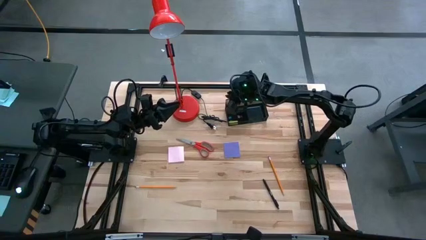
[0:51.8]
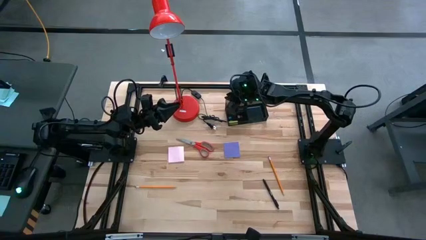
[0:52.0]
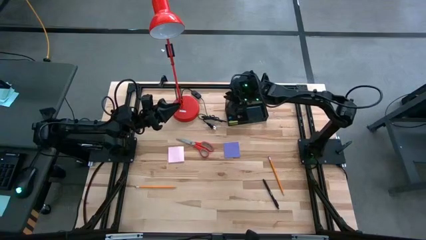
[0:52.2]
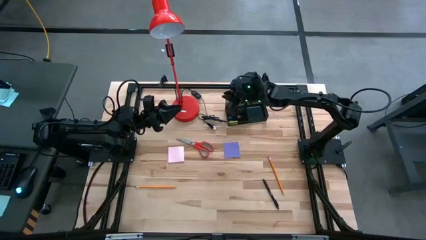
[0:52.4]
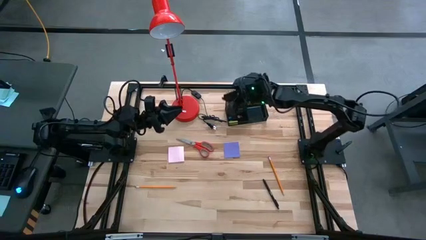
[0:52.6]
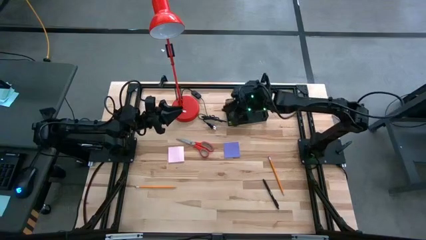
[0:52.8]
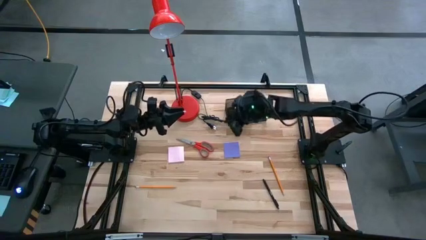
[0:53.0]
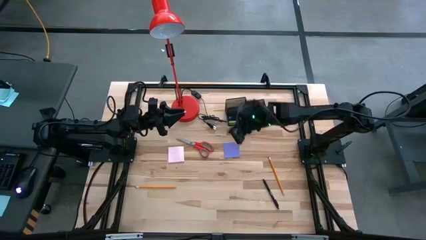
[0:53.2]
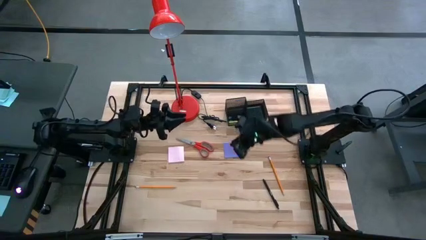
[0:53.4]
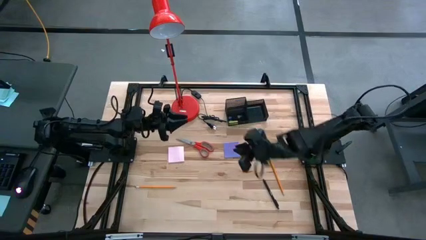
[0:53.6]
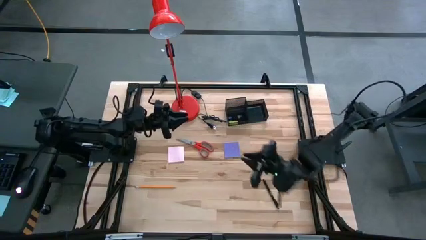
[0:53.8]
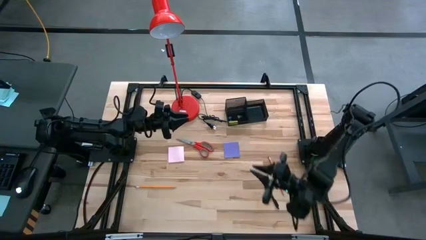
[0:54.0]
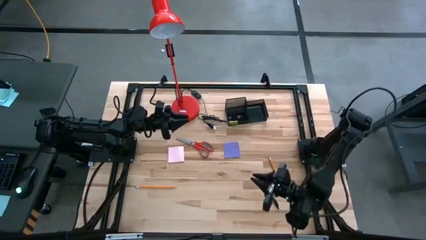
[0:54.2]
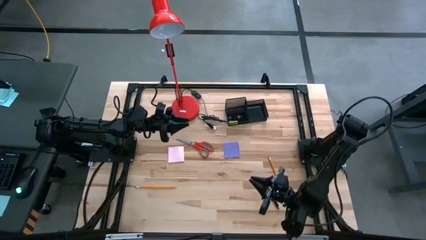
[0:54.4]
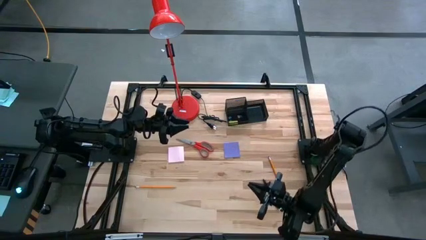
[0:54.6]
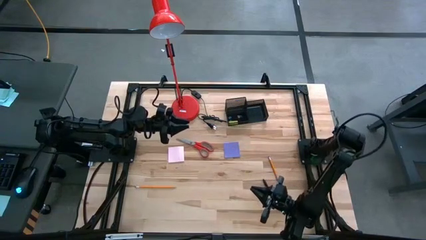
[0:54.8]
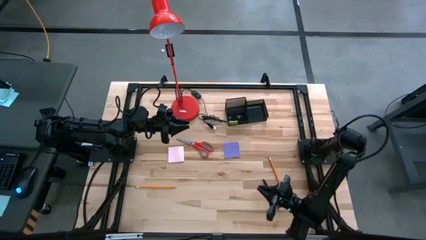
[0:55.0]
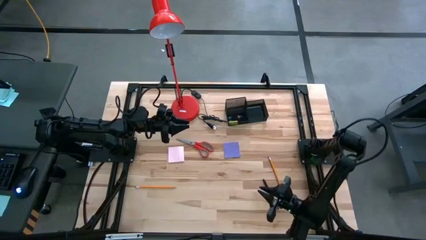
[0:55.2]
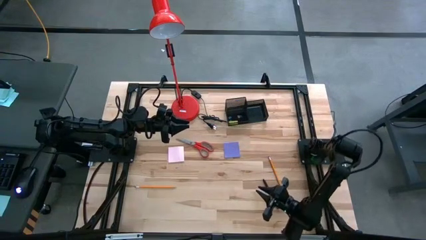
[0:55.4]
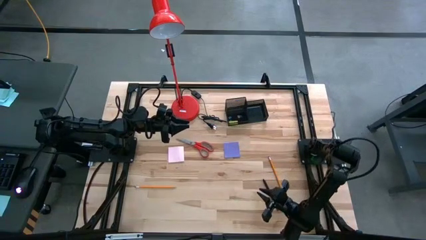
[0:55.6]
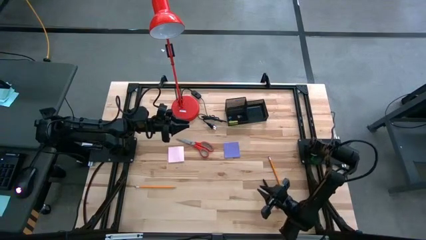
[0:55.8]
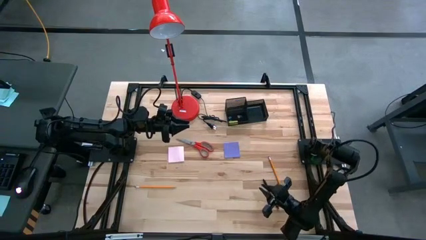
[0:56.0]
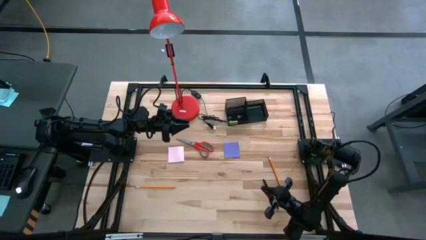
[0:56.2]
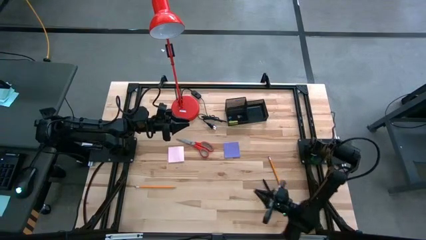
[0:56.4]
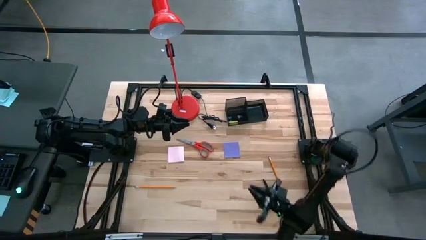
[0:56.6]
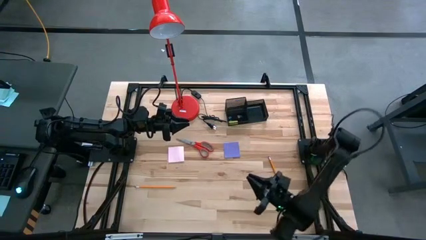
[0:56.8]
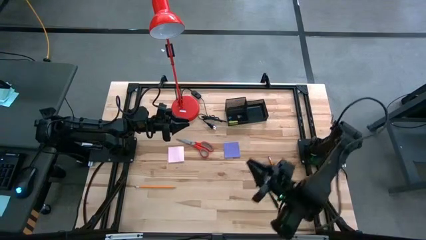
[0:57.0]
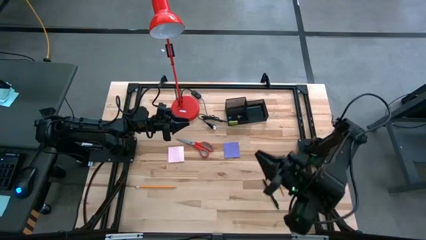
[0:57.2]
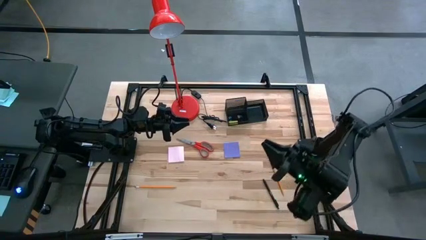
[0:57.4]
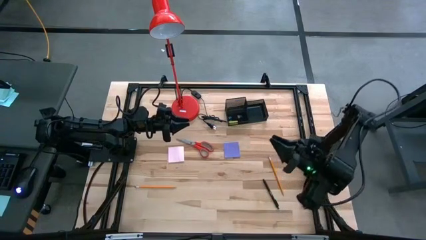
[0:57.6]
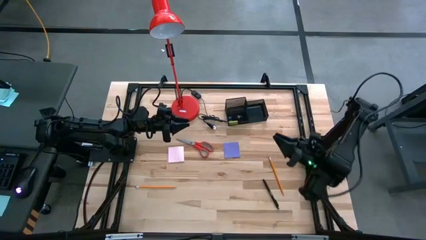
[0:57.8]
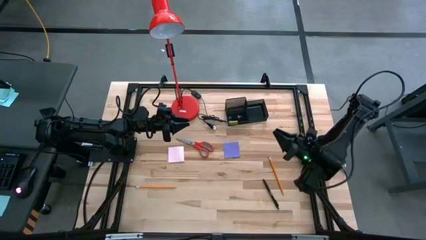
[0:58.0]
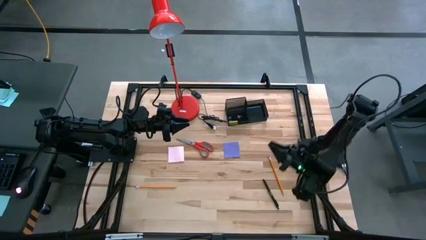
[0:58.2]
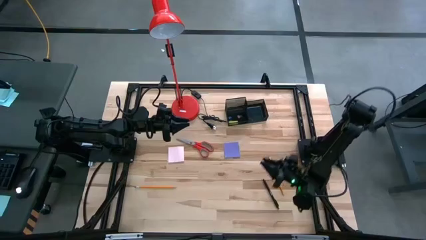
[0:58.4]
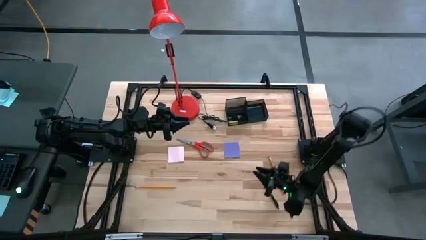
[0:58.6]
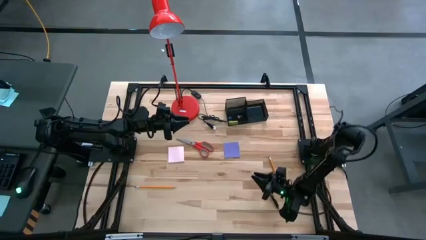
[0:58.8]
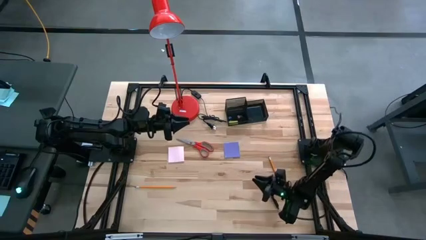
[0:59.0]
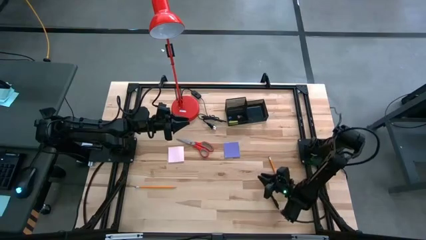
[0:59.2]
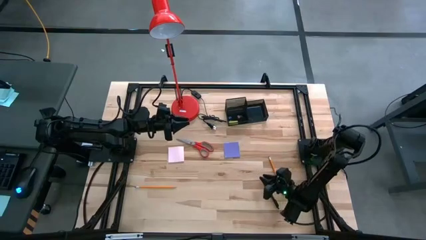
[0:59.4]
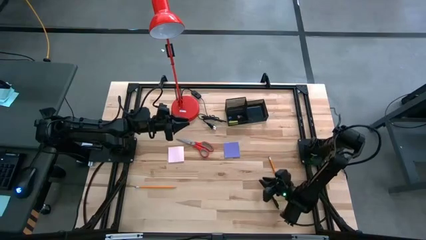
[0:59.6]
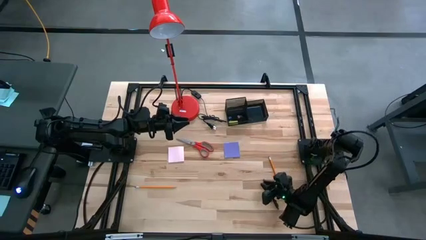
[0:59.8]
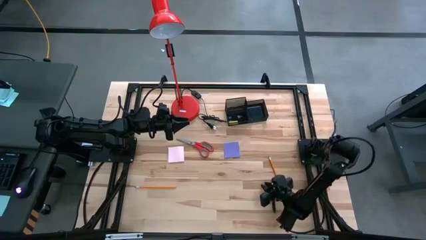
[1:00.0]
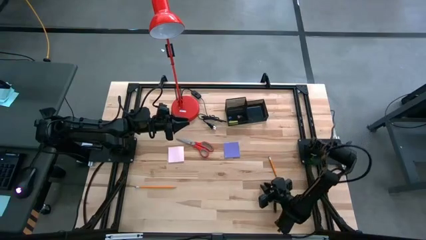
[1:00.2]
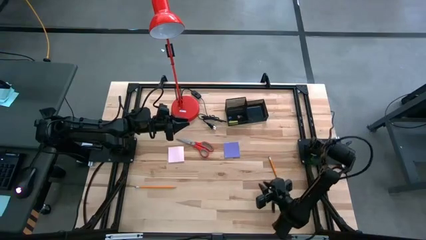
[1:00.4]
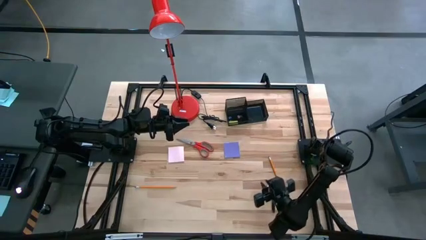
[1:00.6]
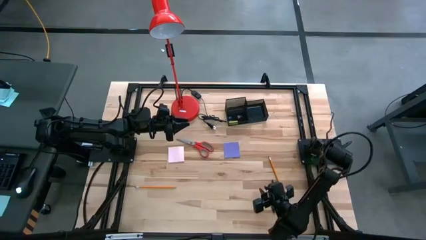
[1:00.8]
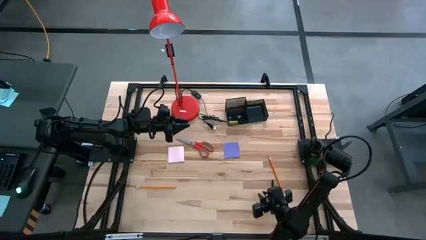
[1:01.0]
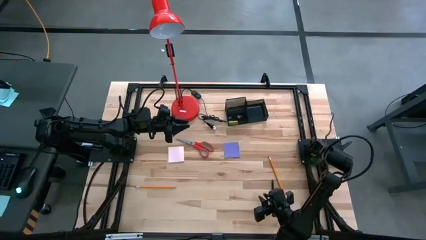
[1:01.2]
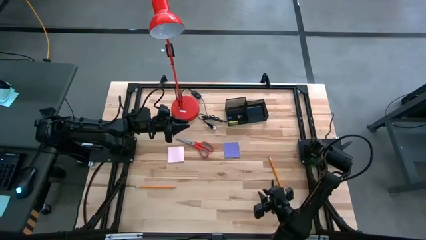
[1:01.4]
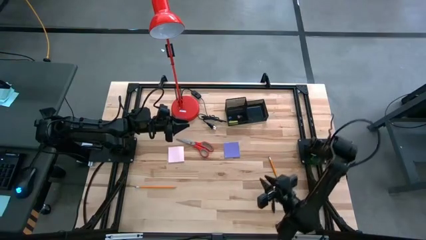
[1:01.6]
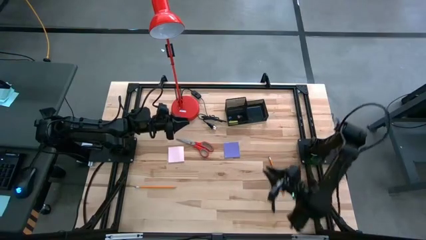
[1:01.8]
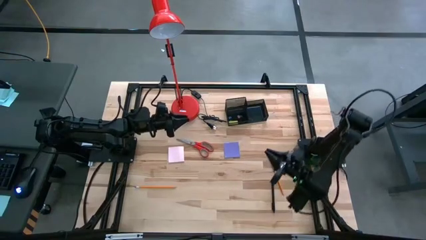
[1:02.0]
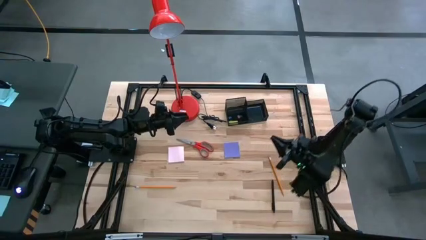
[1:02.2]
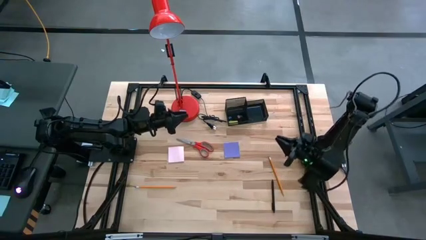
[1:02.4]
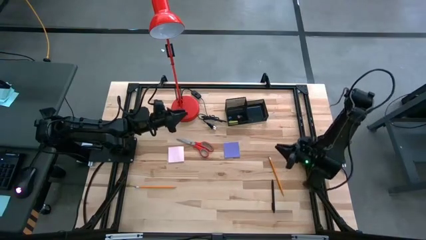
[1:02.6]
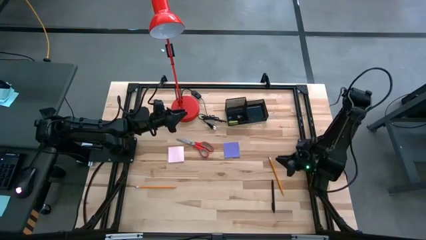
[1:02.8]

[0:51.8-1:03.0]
Task: Pick and place office supplies into organizer
Put the black pen into the black desk organizer
